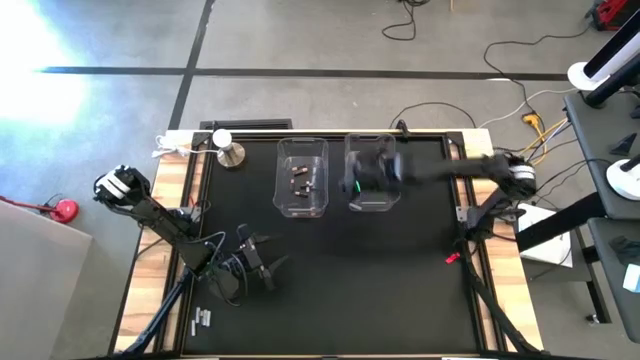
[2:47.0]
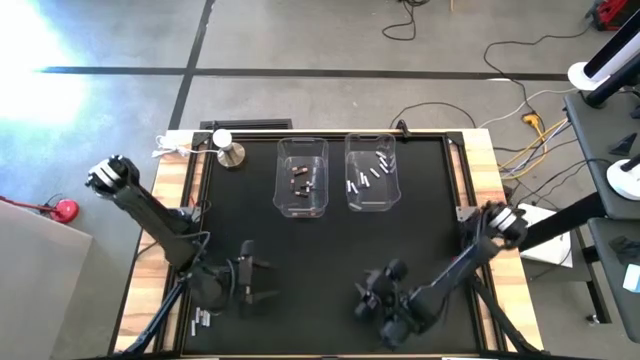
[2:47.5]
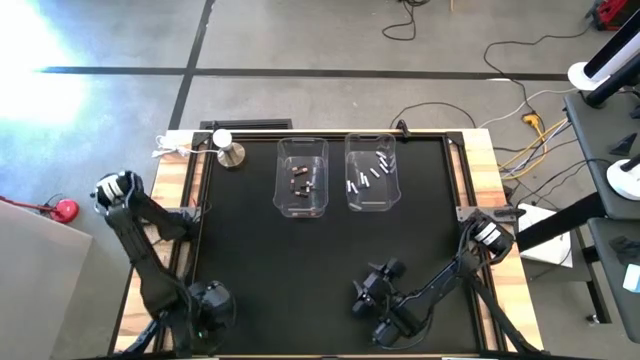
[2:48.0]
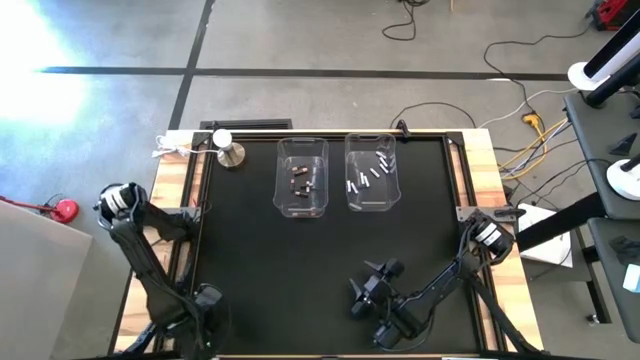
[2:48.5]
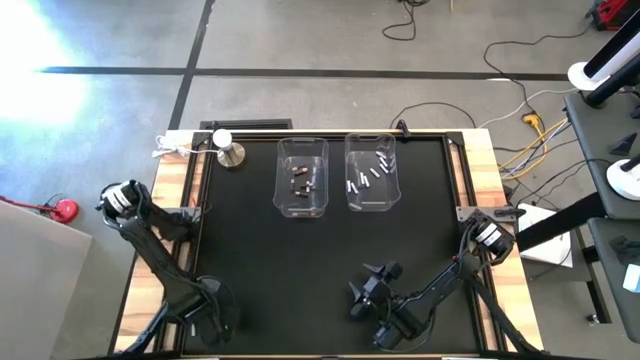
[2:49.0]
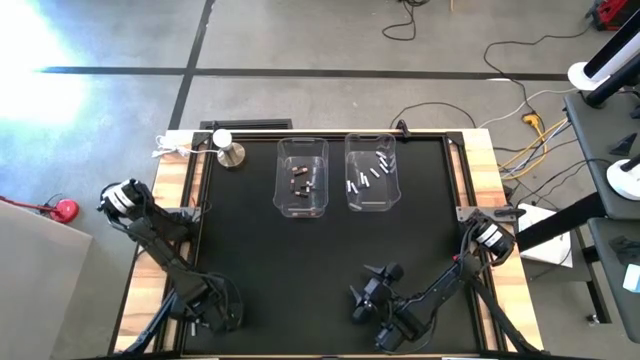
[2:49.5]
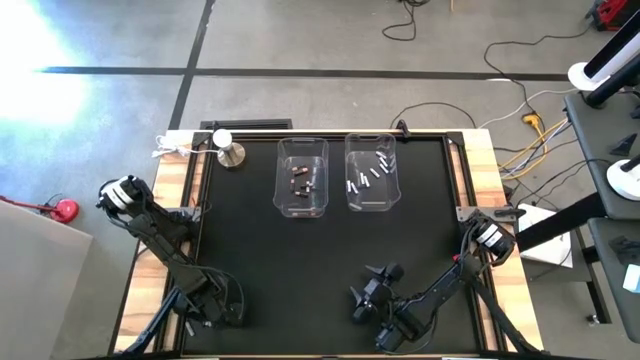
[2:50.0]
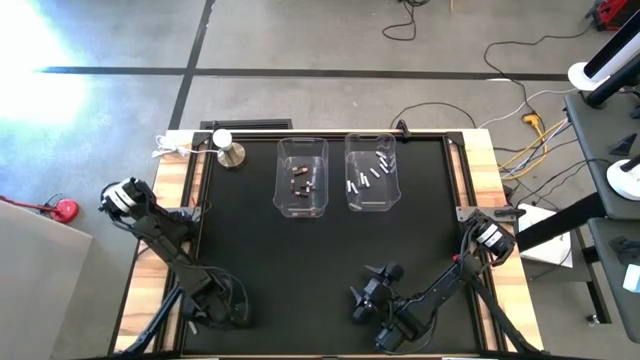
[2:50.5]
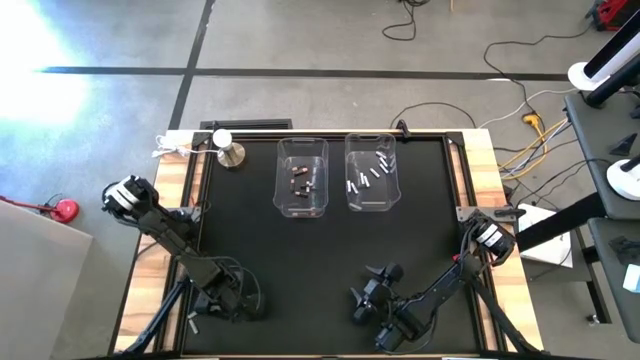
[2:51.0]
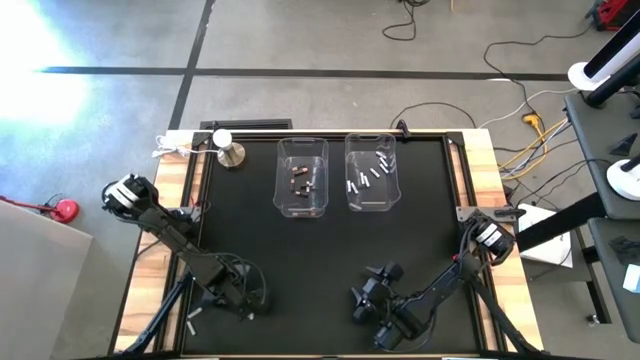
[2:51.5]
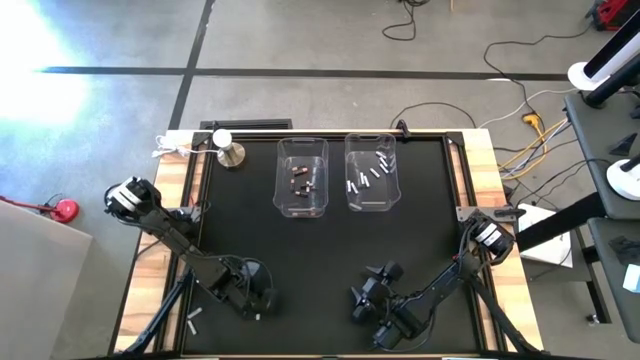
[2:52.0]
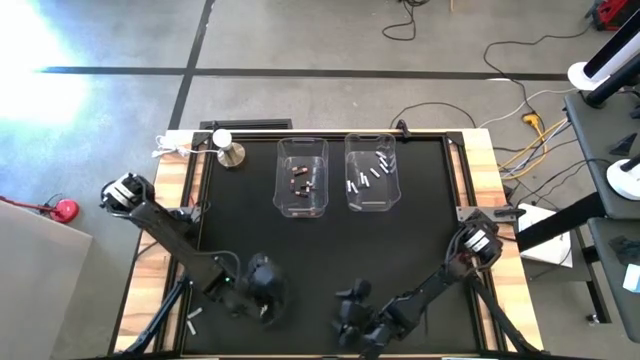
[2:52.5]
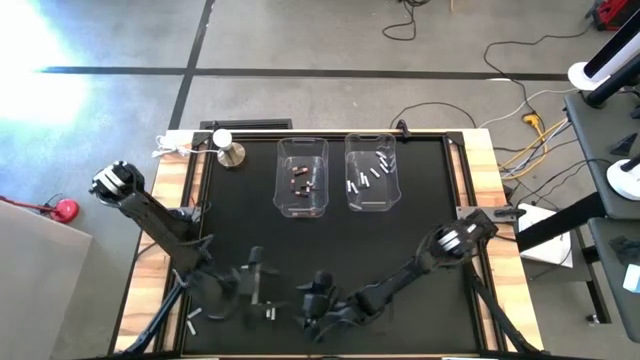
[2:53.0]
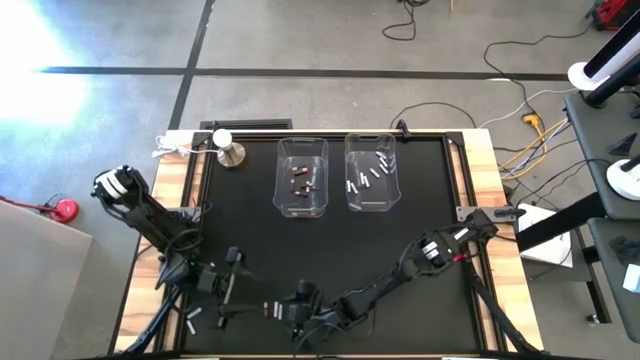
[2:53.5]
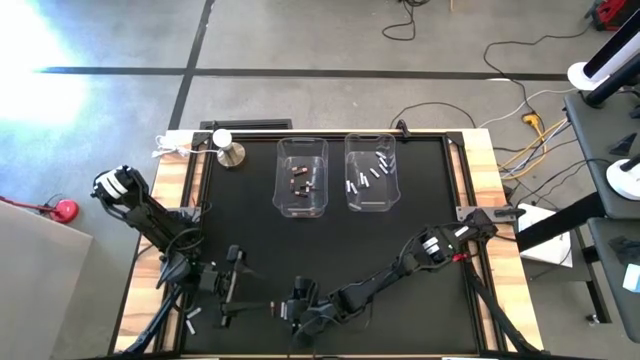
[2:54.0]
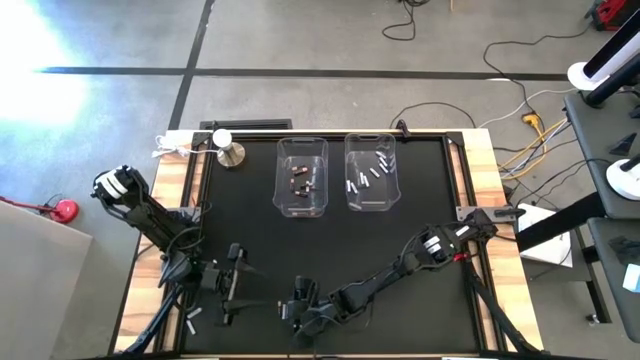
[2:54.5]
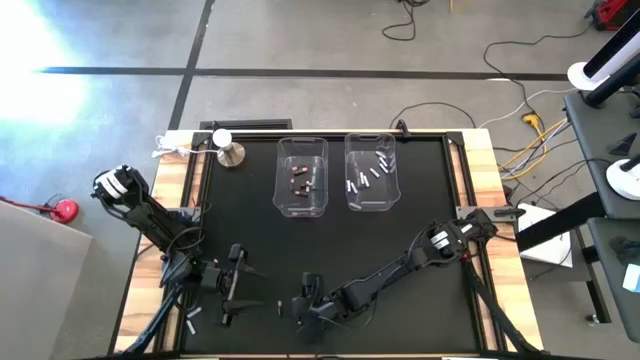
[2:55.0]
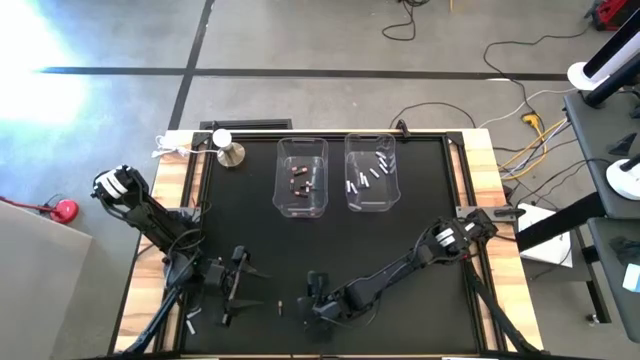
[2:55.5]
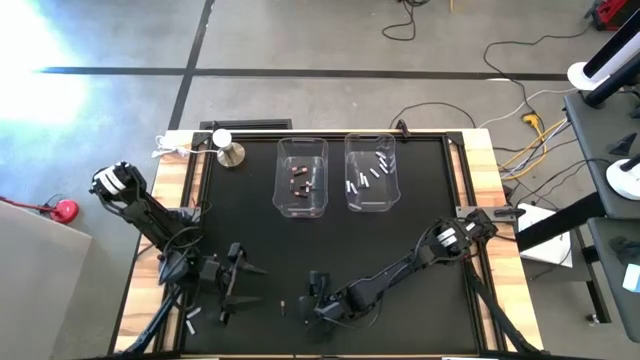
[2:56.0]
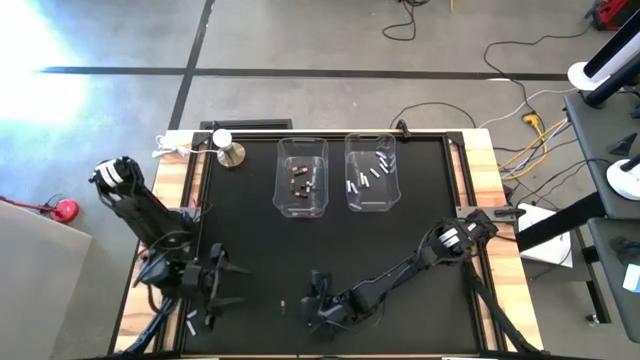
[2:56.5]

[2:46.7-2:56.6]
Task: Sort batteries
Put the white battery into the right transparent bin

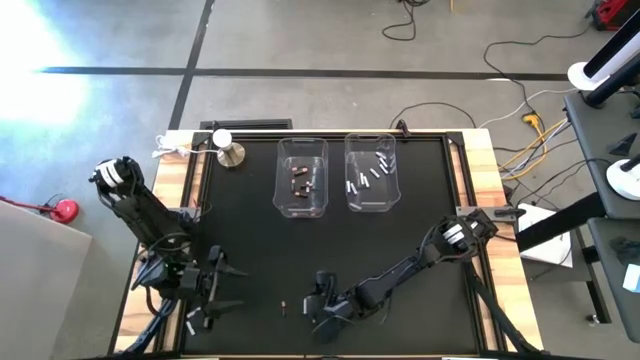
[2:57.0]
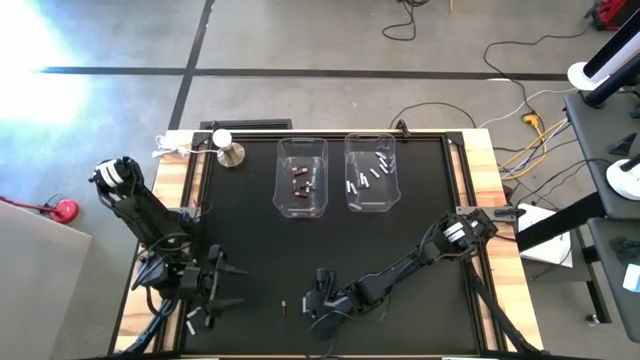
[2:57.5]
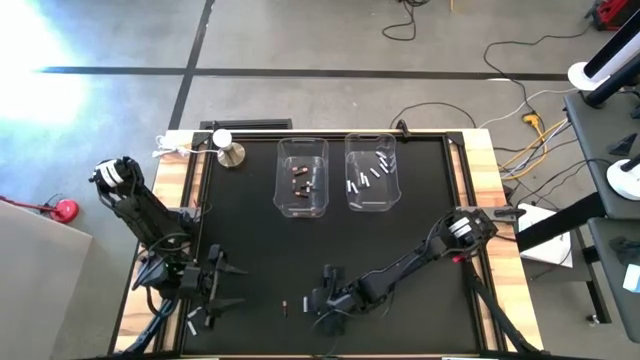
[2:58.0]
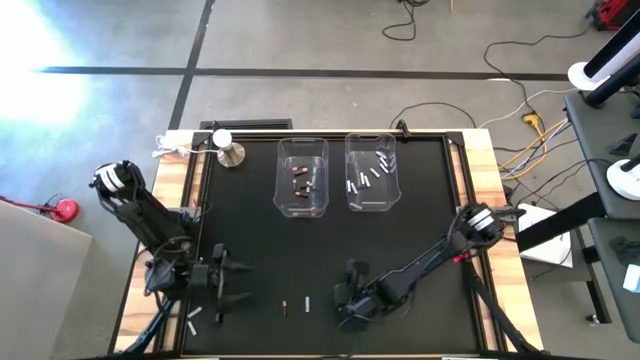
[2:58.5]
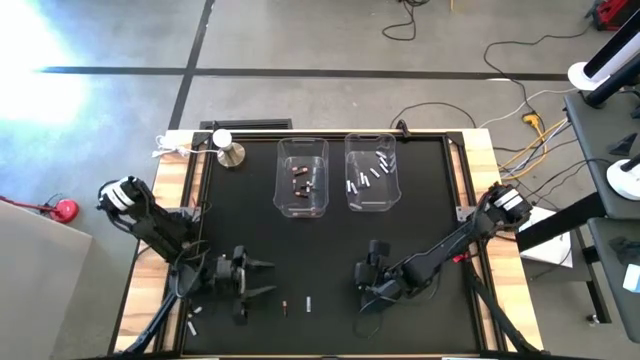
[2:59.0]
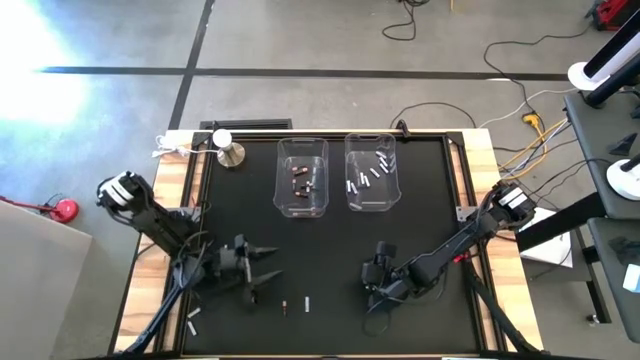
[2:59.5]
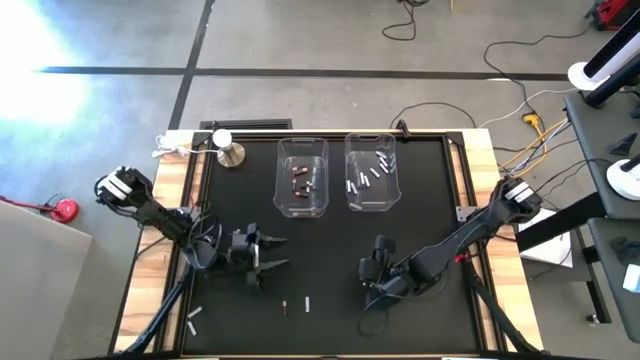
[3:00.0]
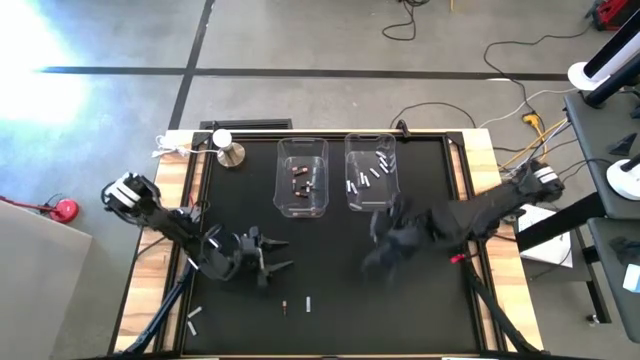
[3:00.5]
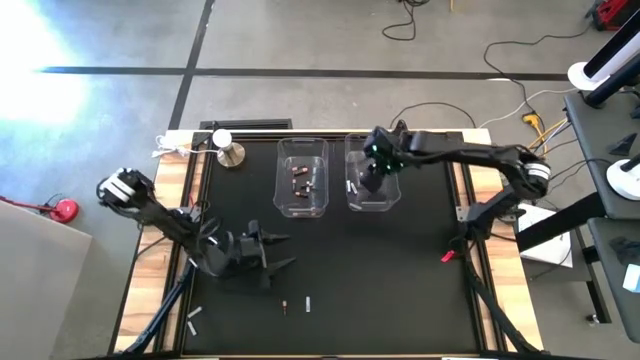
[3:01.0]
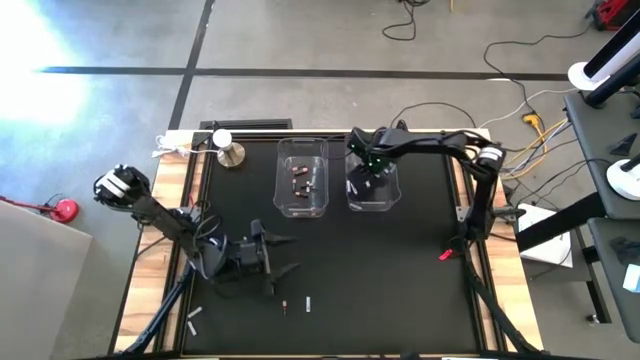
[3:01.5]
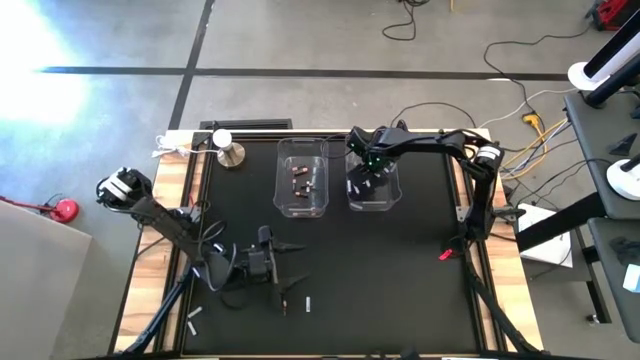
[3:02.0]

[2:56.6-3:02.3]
Put the white battery into the right transparent bin

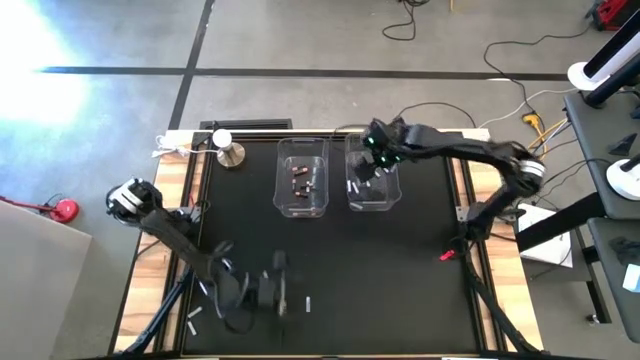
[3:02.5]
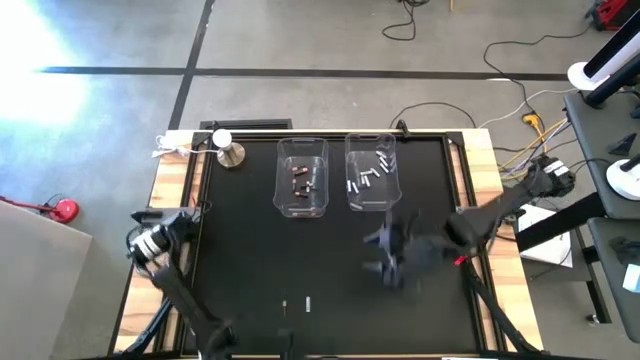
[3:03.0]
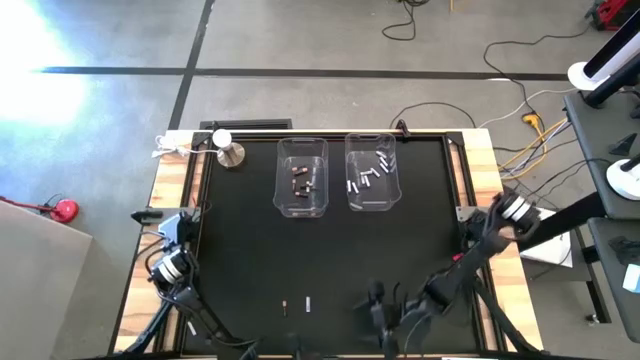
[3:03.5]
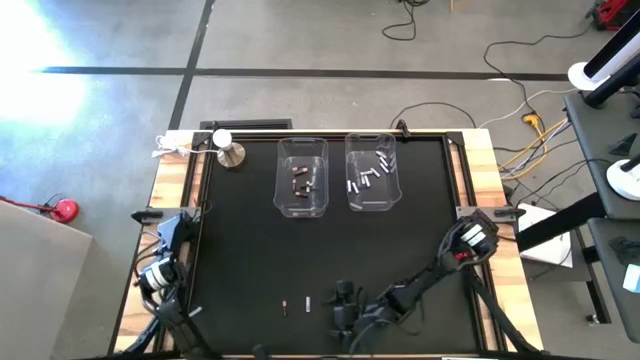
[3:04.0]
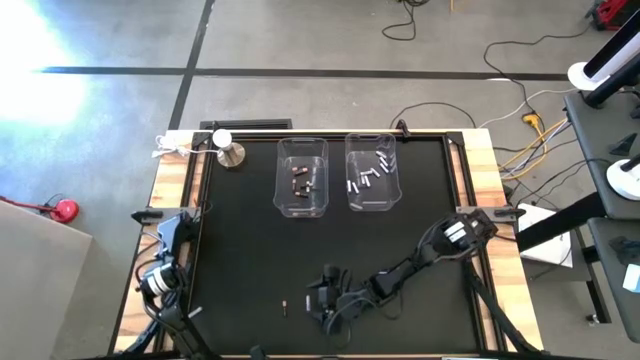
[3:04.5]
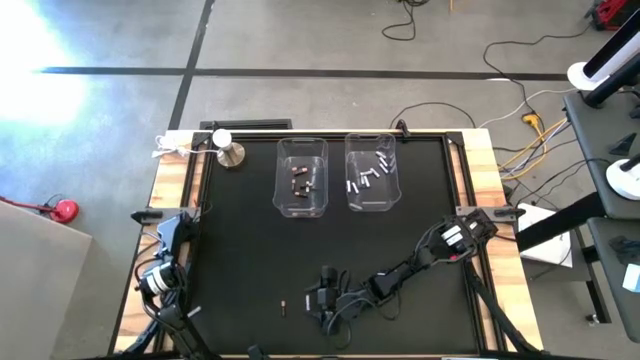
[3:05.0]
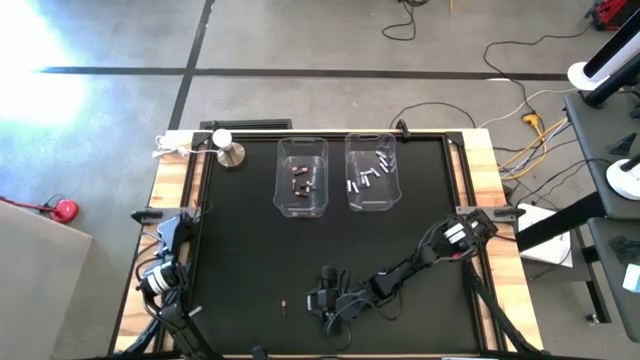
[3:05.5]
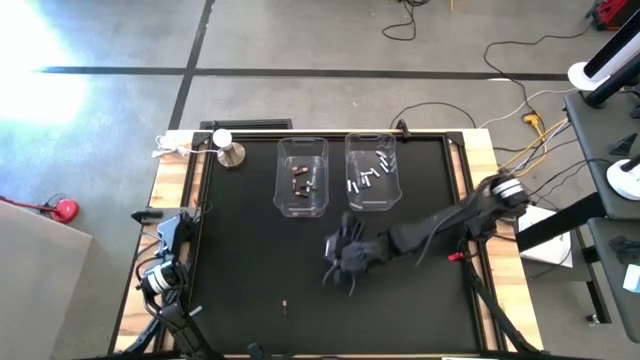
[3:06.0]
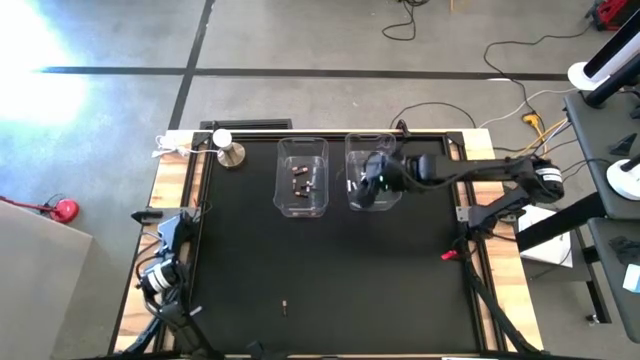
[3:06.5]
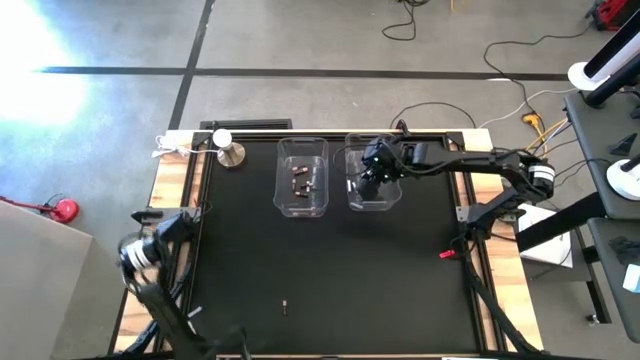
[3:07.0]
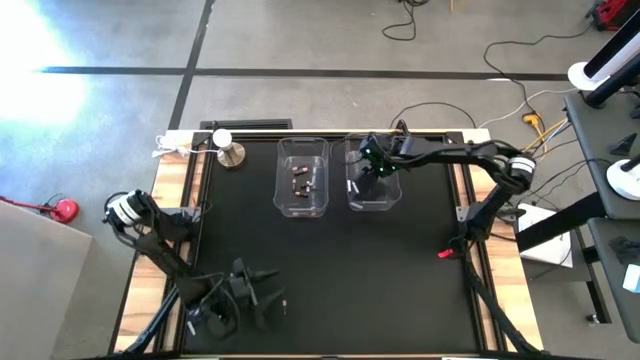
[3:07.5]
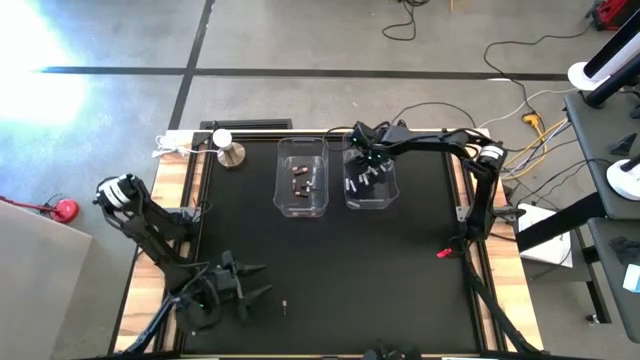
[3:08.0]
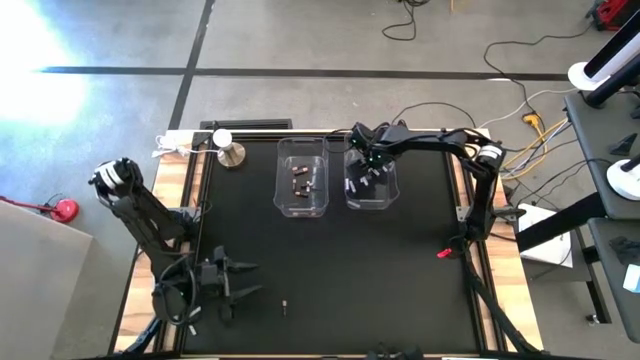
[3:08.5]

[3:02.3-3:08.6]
Put the white battery into the right transparent bin
